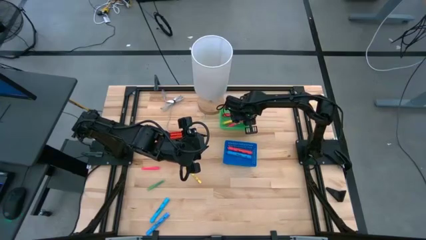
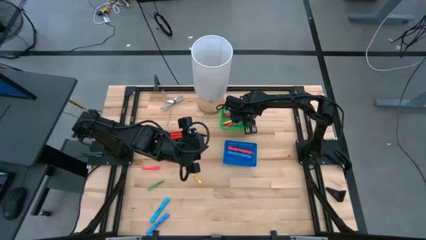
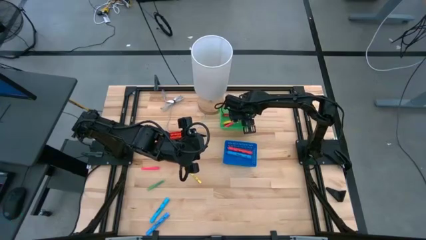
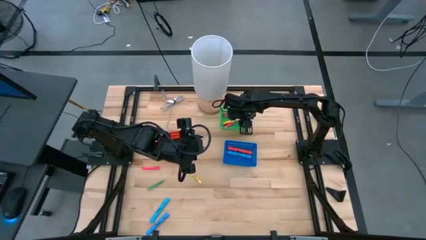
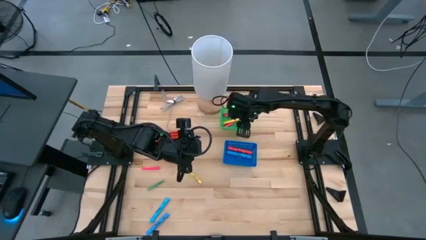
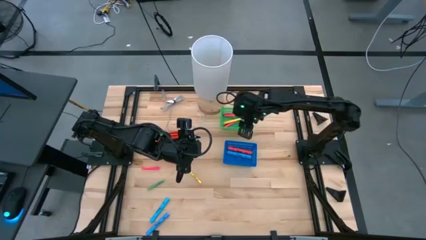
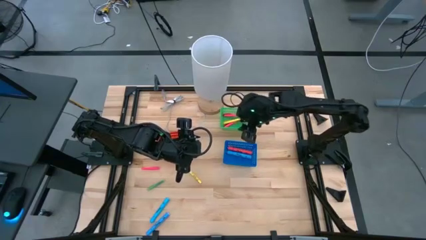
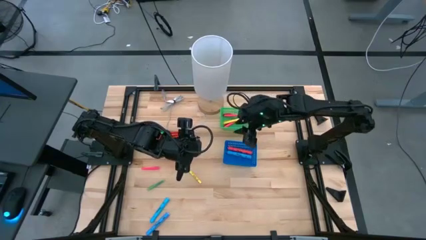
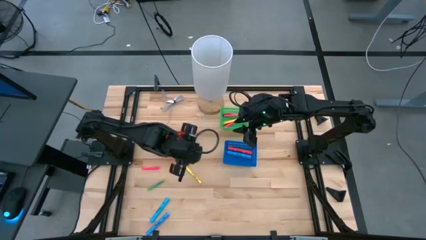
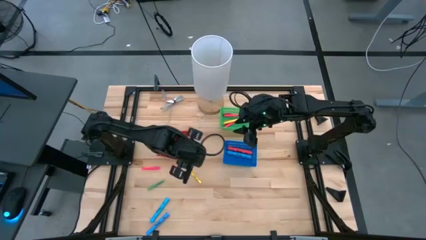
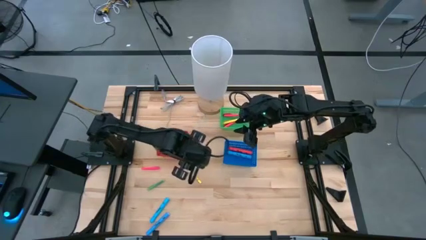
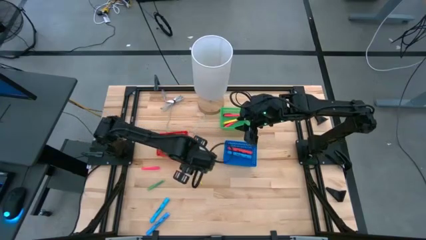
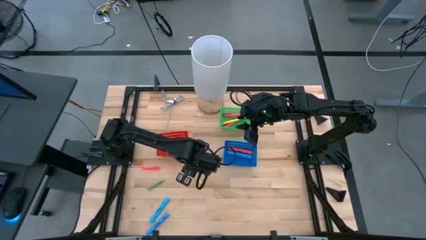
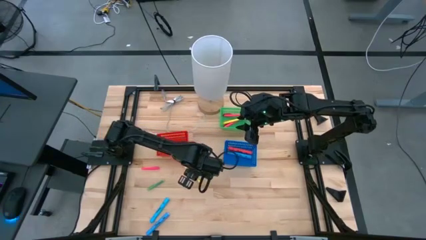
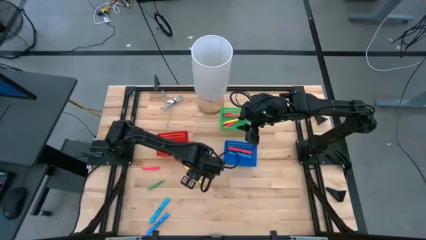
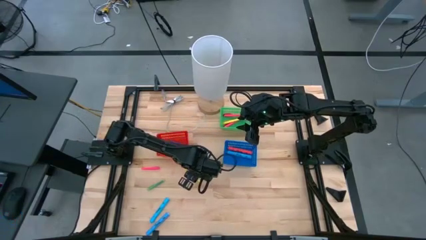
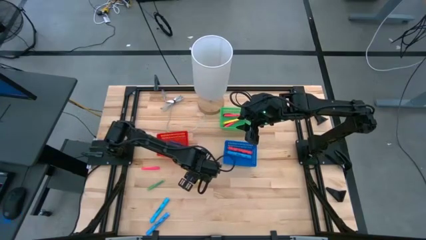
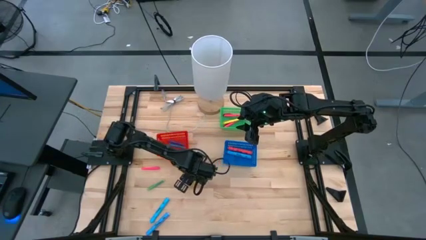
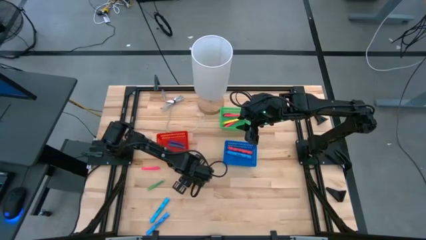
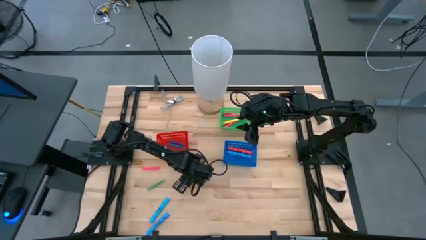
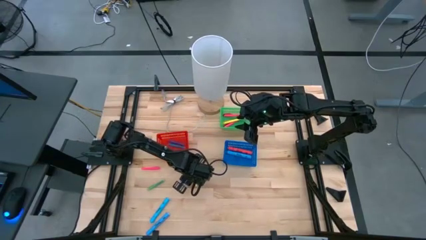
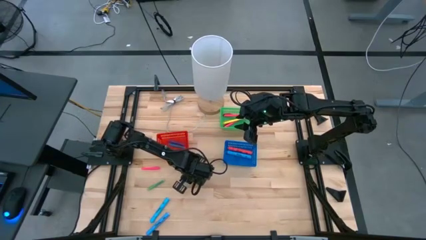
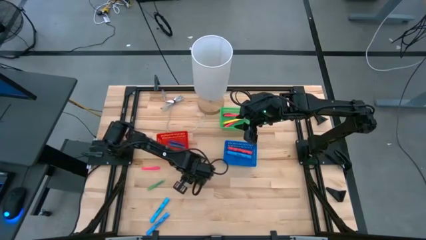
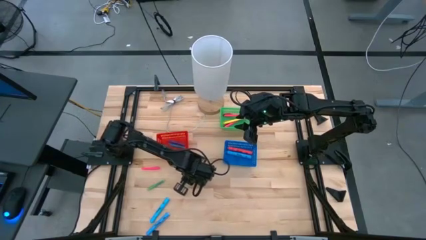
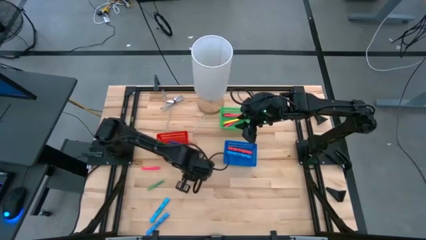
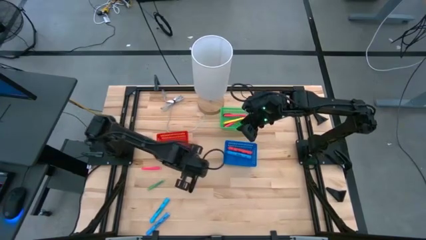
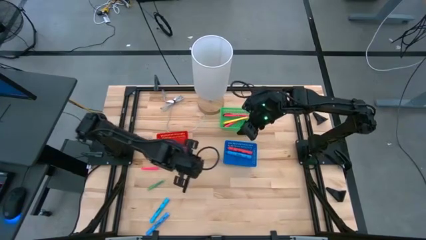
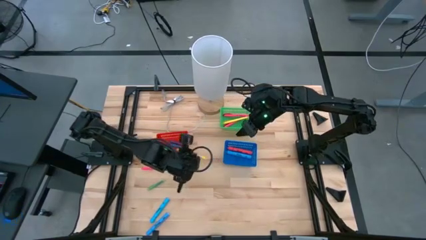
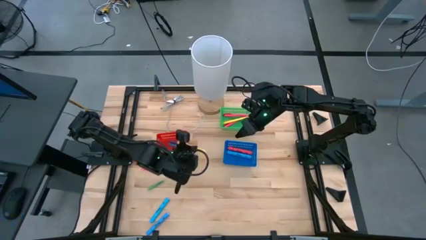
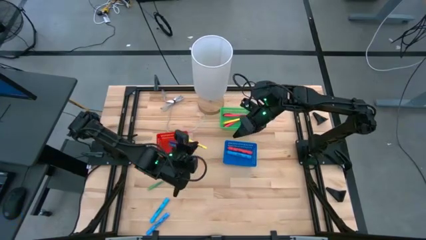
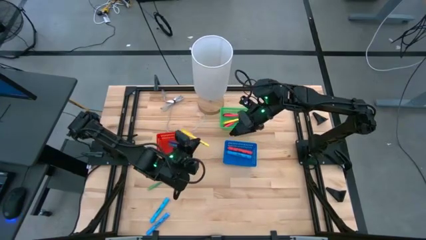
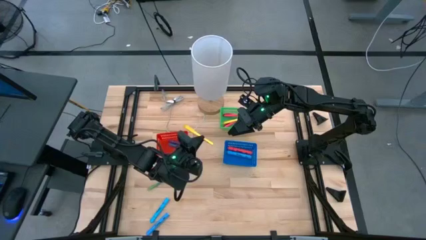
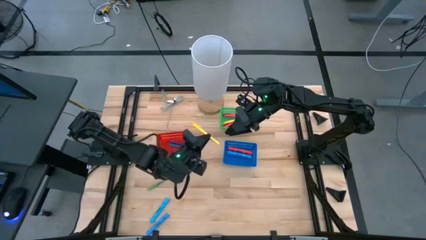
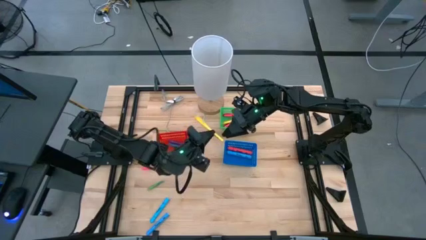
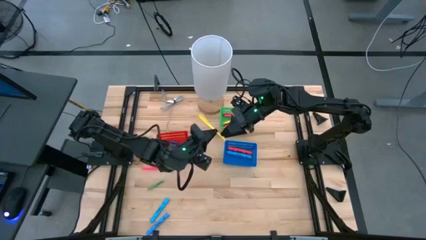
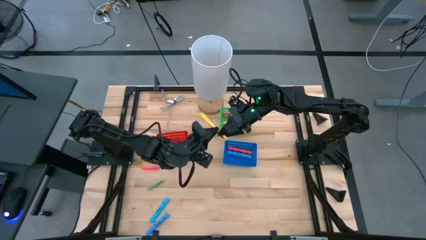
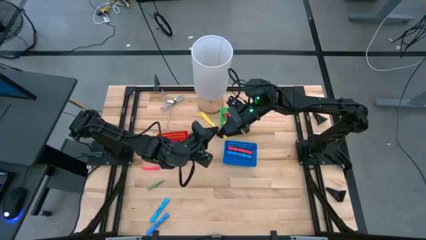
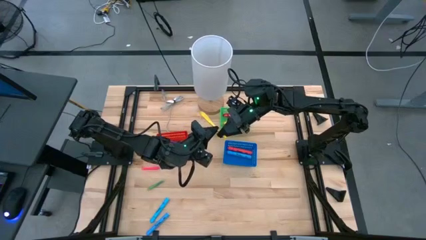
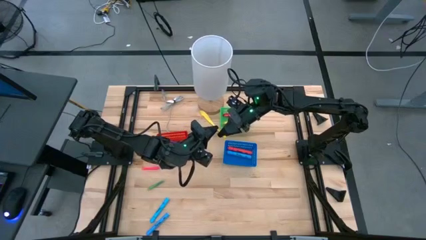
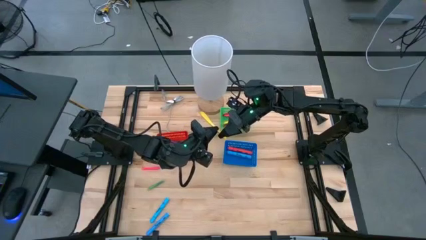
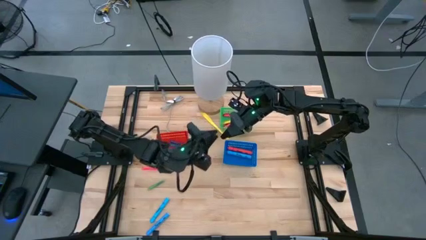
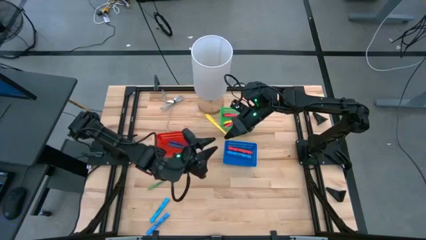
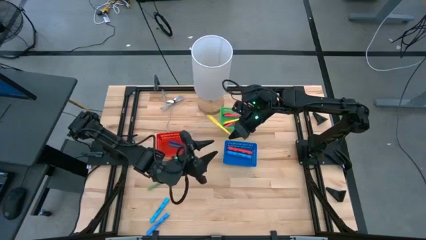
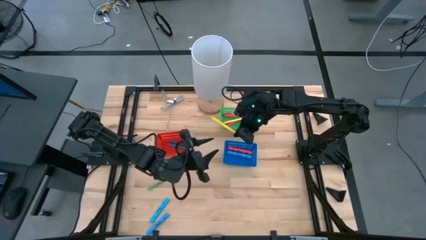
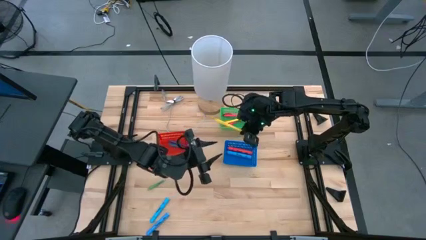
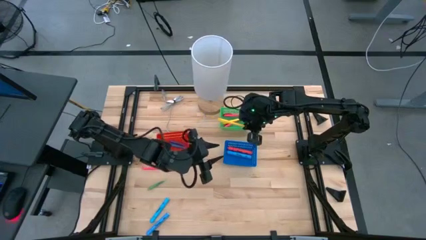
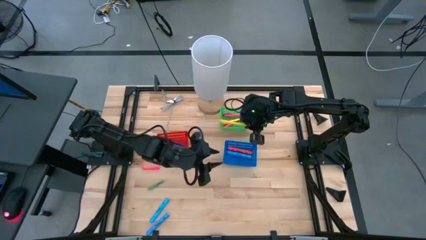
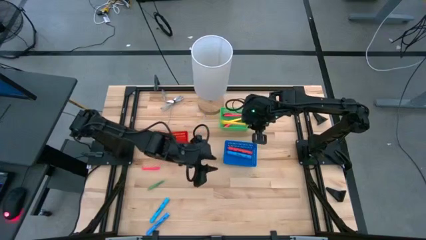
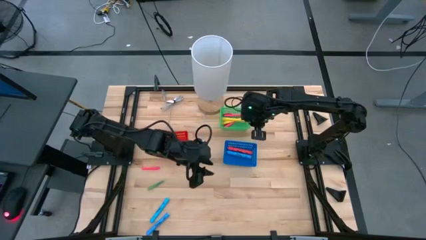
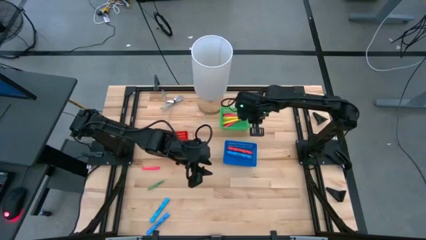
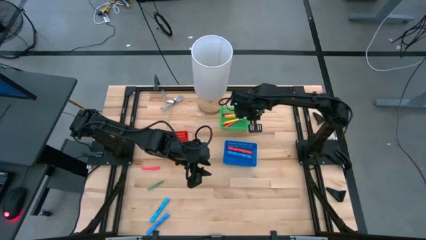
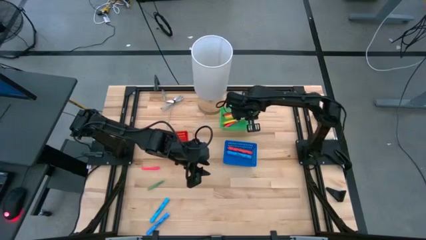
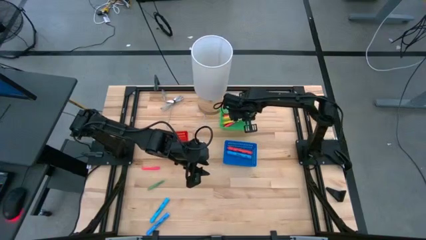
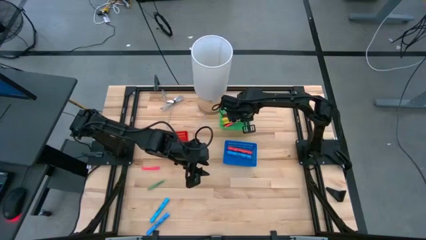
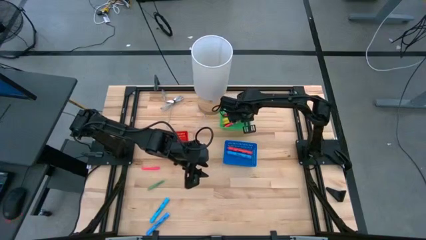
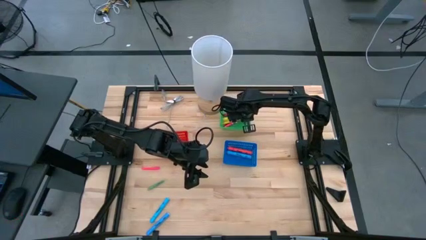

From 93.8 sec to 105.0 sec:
Task: Pick & Place Markers
Put the large yellow pen into the green bin
